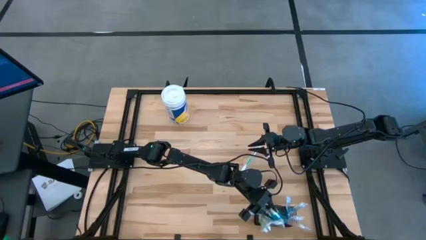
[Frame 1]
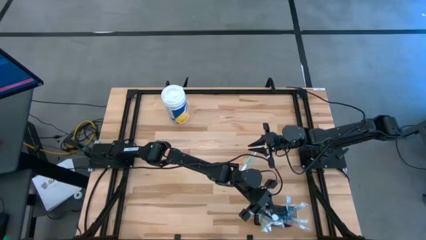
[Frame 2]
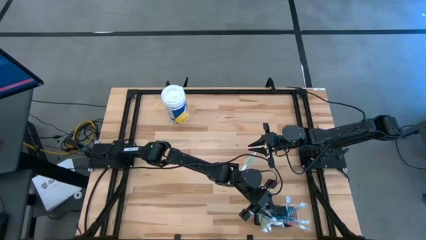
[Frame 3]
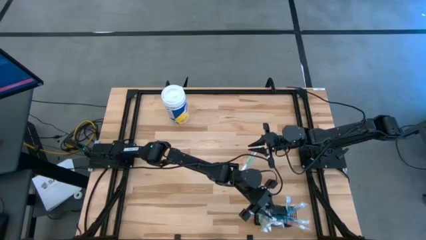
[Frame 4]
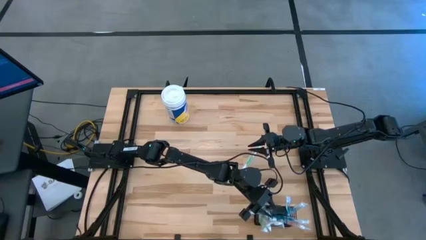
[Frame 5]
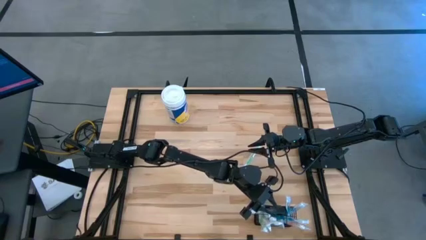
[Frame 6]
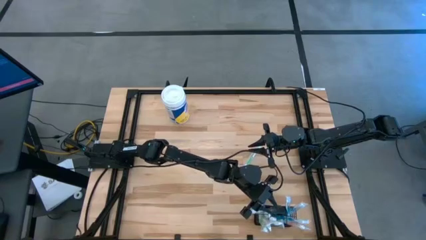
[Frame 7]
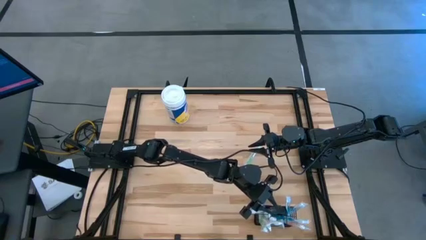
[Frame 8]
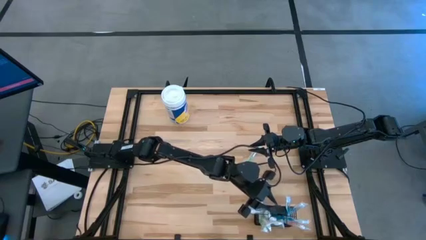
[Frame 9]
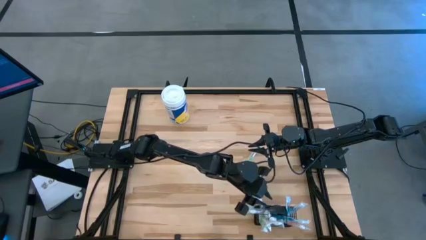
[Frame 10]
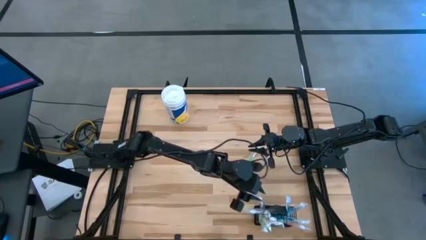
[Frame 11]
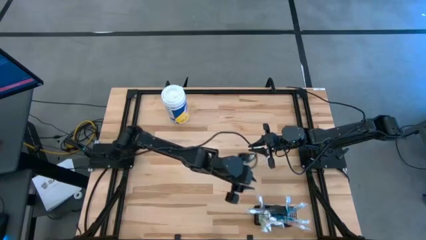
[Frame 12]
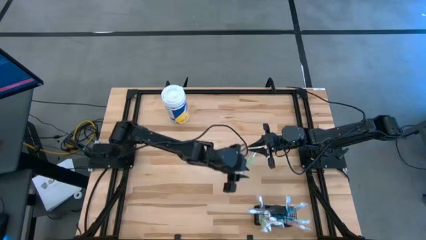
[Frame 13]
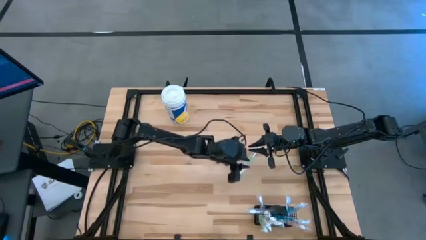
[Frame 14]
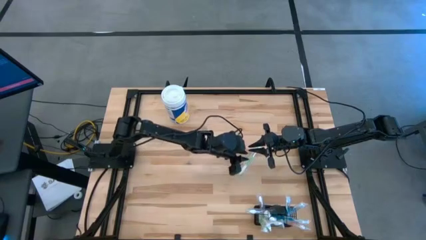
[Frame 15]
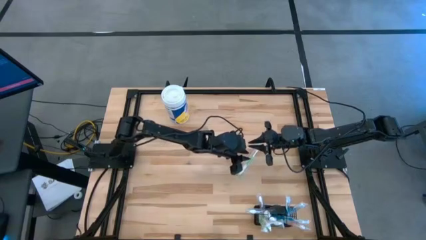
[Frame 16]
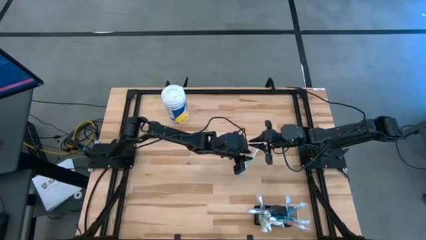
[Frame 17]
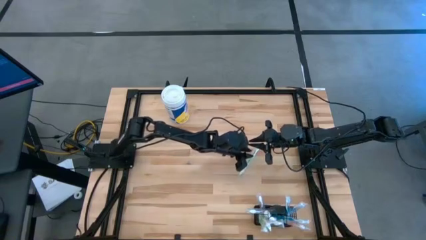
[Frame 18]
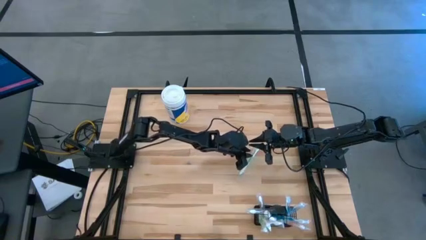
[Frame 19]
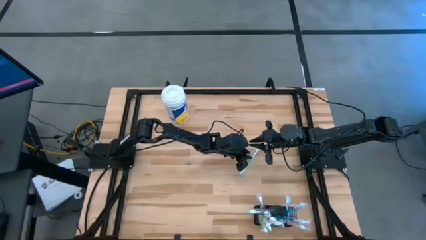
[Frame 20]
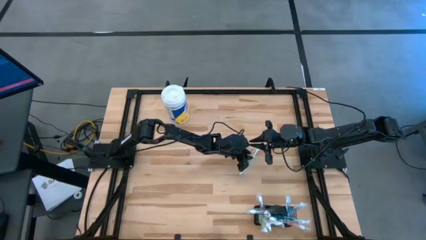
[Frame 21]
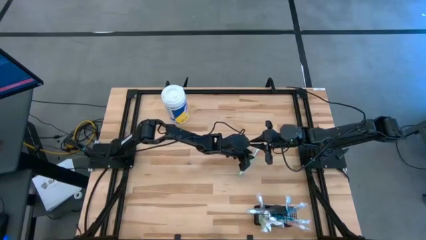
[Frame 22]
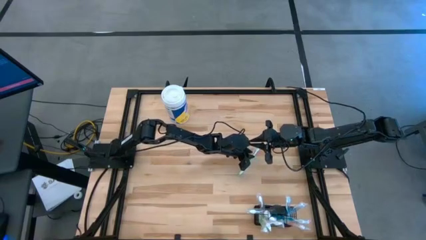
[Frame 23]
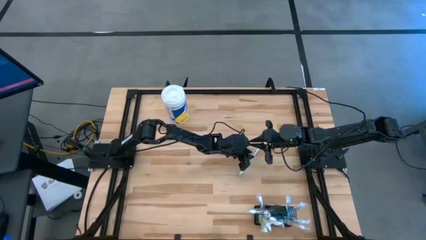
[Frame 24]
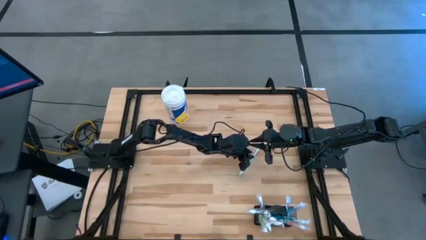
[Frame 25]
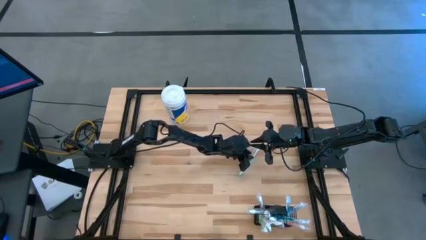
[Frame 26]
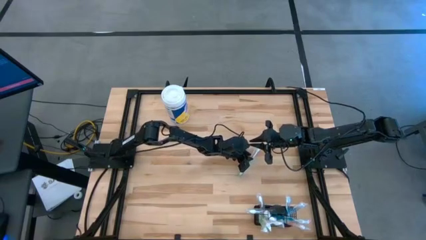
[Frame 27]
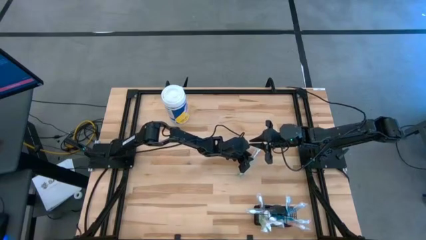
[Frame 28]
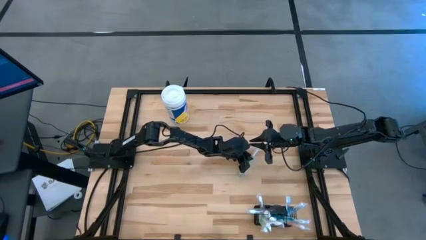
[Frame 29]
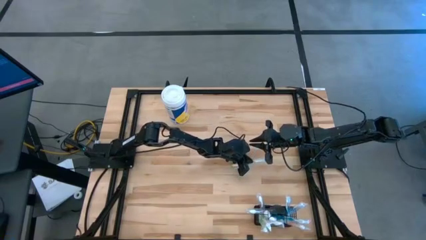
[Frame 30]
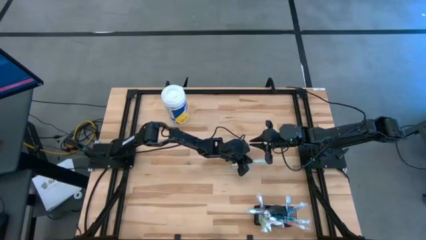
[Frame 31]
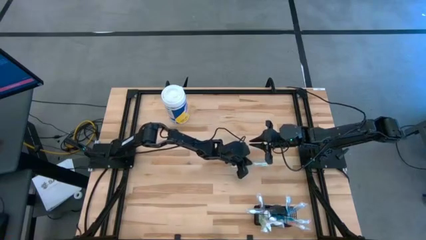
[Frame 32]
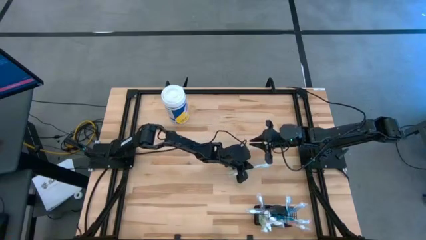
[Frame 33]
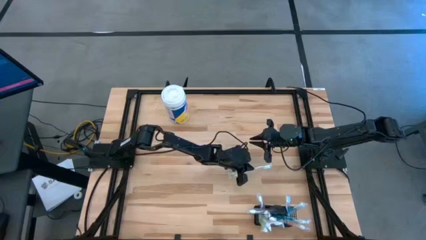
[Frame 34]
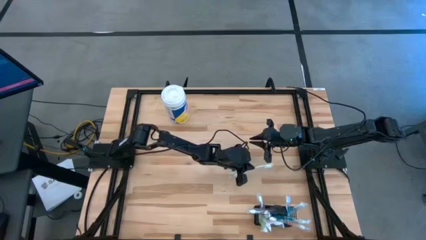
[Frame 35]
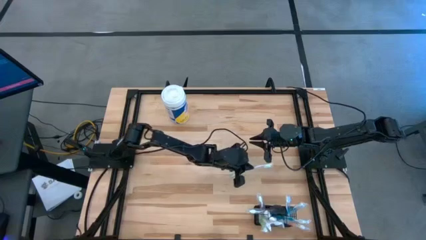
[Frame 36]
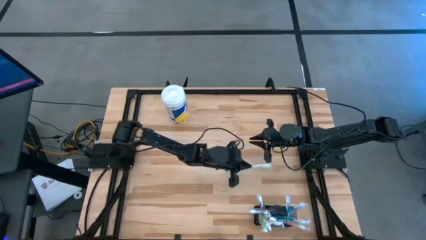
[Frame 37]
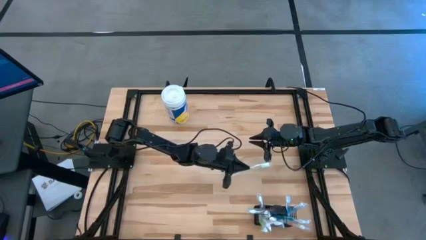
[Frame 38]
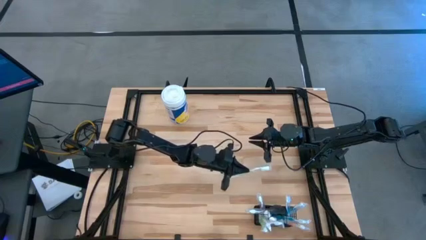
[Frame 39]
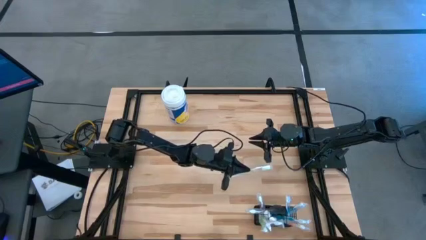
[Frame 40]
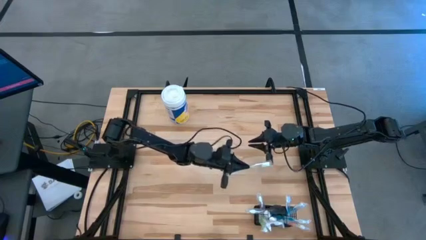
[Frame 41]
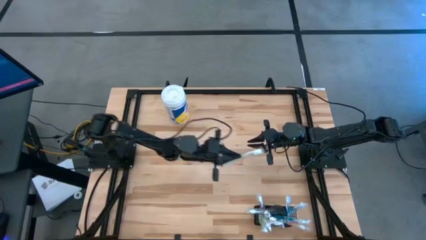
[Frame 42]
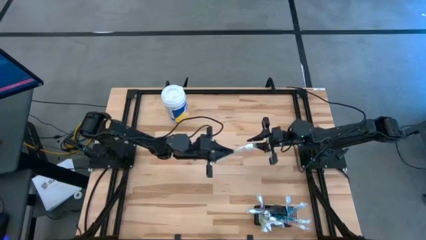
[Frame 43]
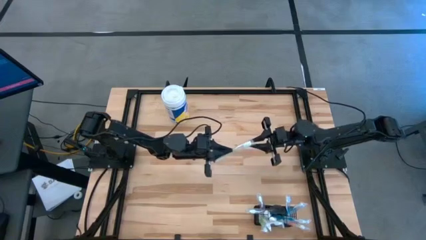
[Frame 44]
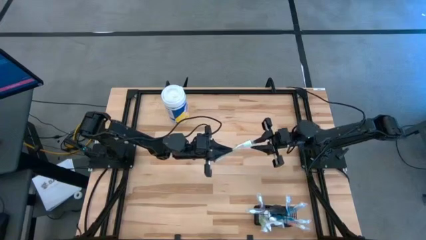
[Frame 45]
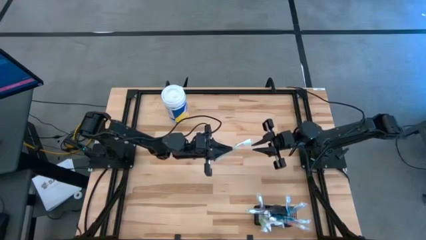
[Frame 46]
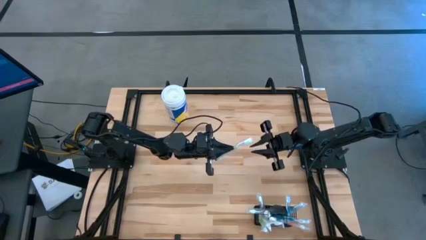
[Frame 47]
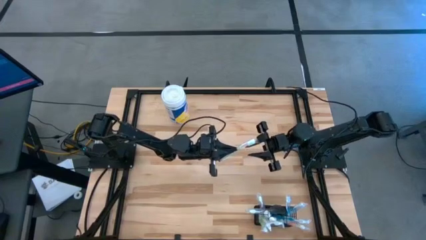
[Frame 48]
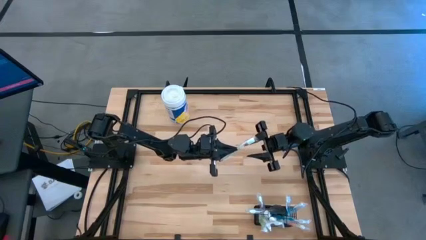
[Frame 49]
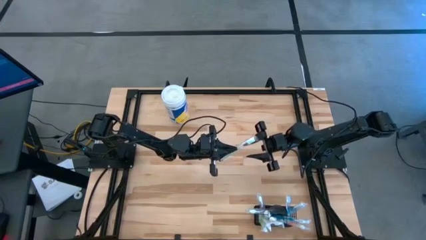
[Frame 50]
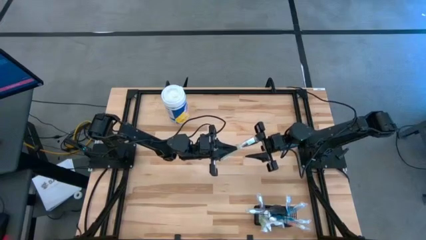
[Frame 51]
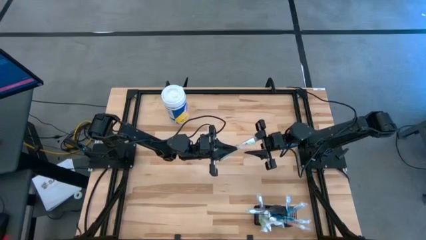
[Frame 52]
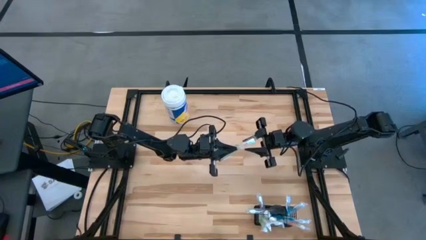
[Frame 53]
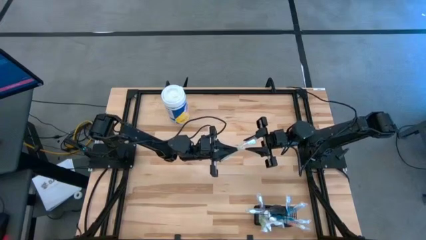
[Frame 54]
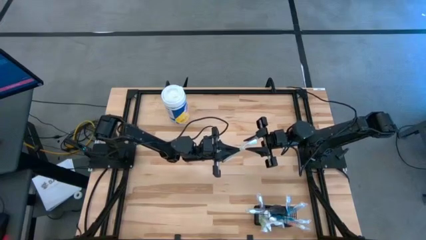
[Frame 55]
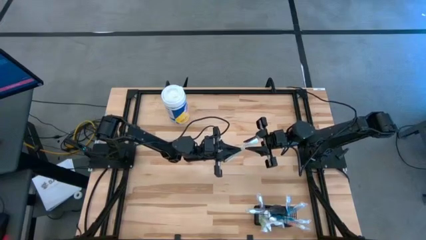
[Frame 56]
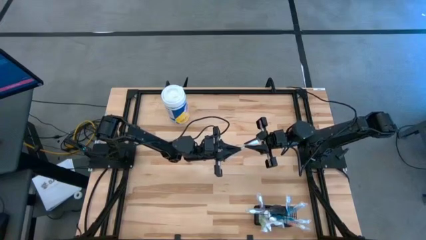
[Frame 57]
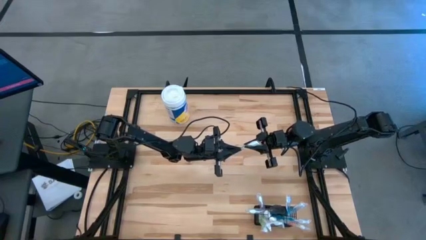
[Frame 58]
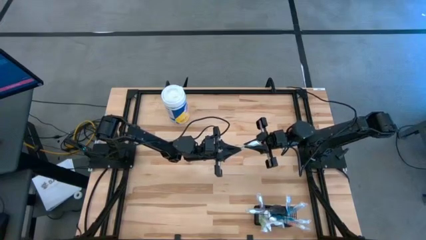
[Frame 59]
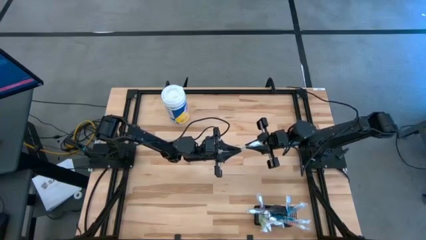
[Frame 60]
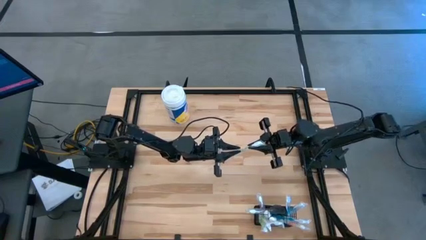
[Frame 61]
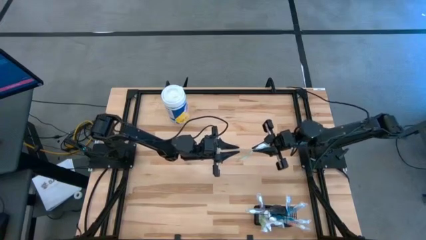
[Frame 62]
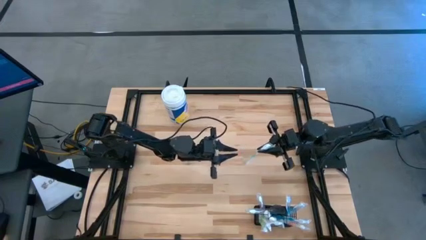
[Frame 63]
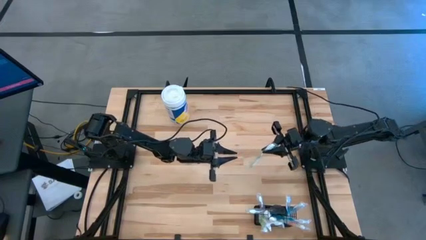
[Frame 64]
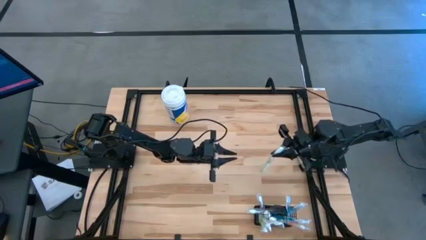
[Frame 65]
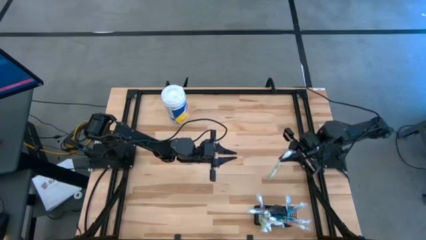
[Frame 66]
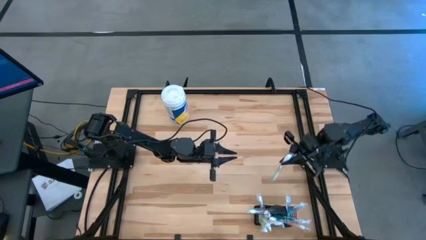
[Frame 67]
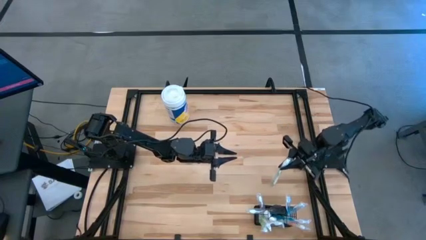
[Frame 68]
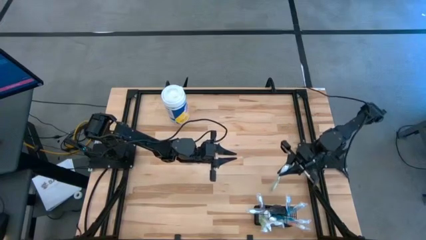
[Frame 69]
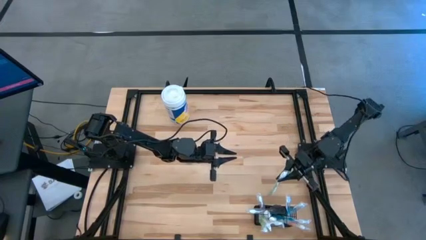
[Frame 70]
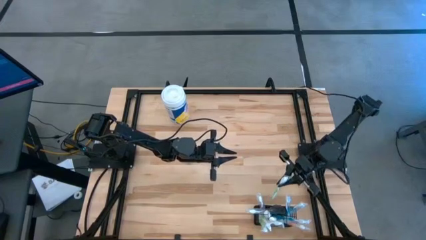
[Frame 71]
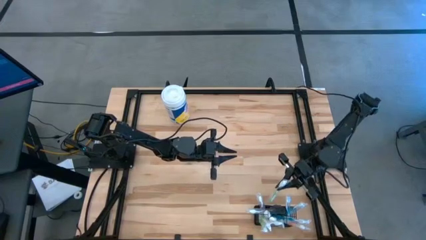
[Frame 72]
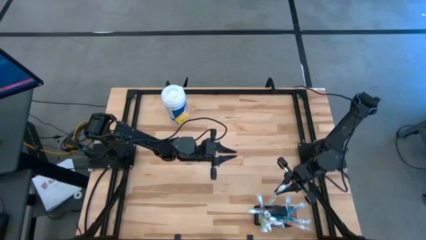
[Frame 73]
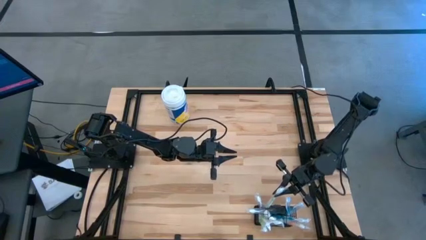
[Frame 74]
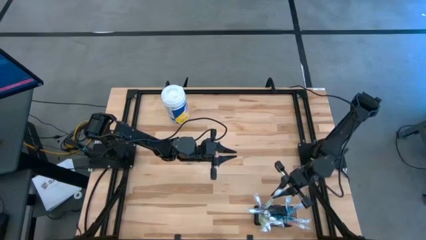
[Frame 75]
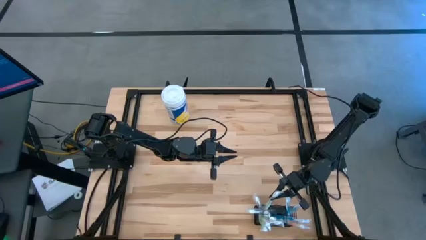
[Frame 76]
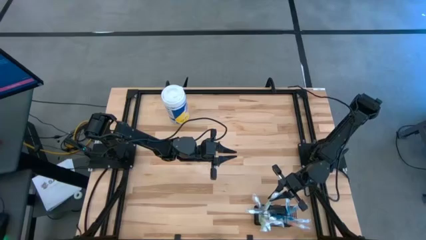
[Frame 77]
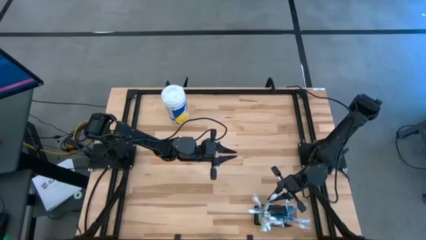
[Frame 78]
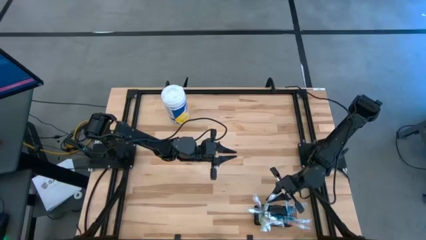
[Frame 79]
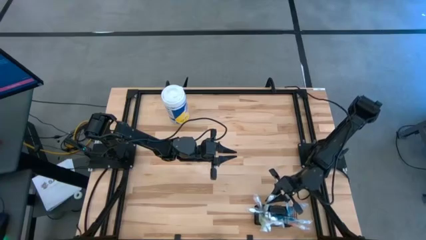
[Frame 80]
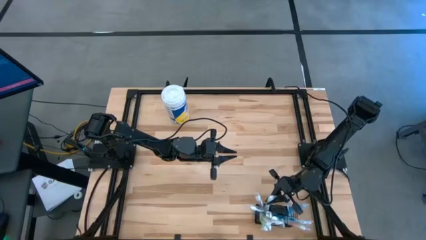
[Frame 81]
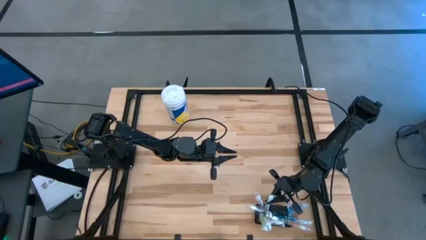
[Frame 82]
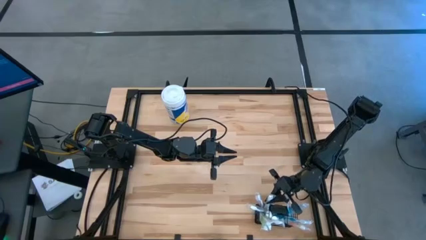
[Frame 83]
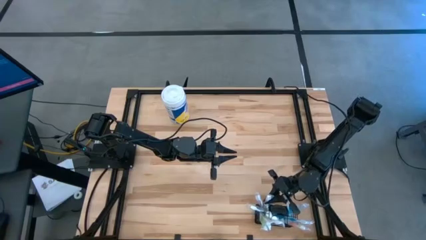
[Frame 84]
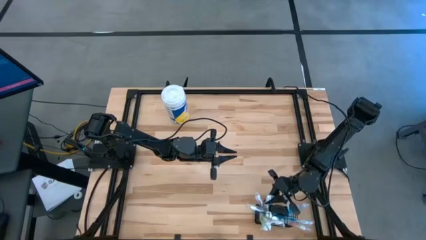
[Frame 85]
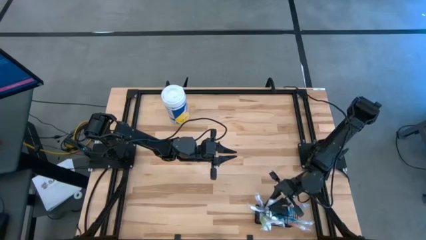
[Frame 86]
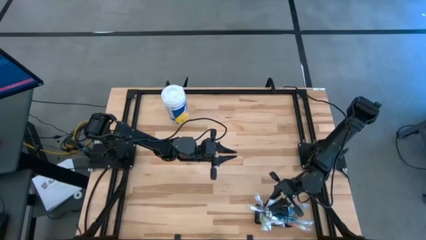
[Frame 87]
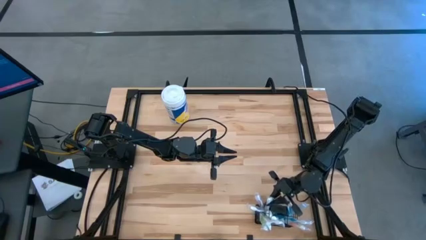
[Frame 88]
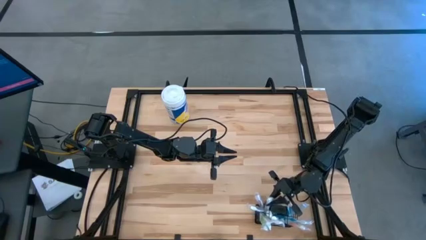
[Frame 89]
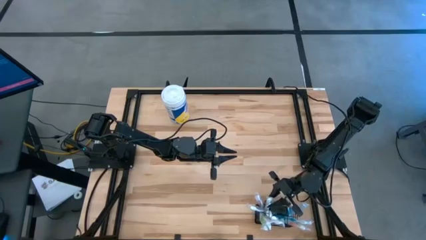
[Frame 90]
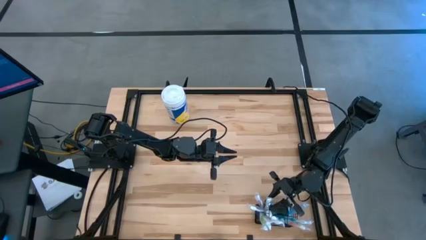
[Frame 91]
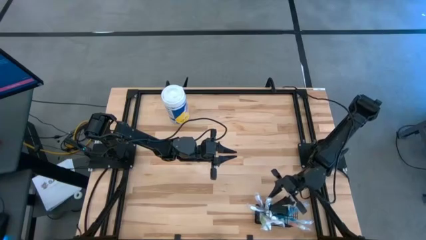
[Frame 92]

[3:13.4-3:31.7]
Task: Pick & Place toothbrushing station
Put the green toothbrush into the wire organizer
